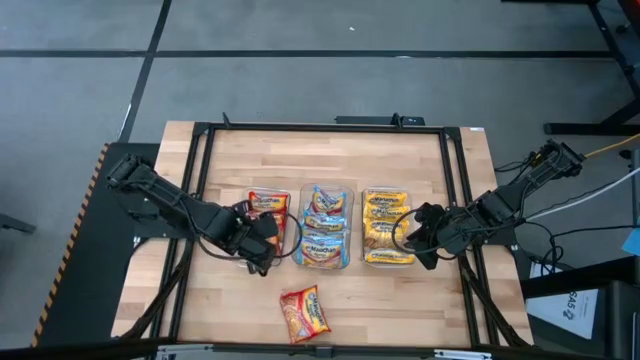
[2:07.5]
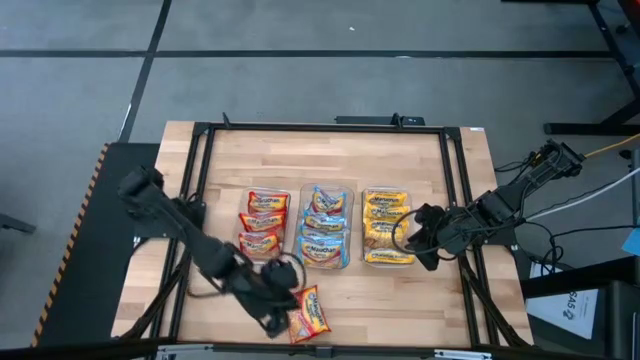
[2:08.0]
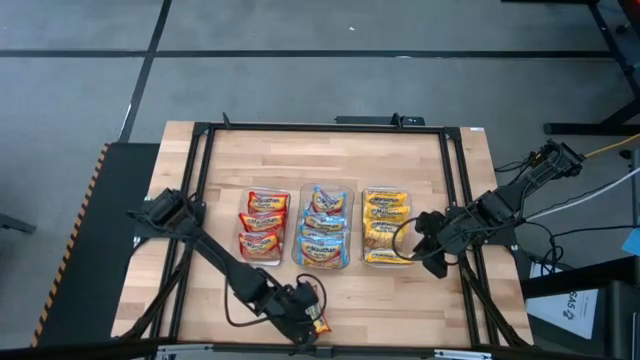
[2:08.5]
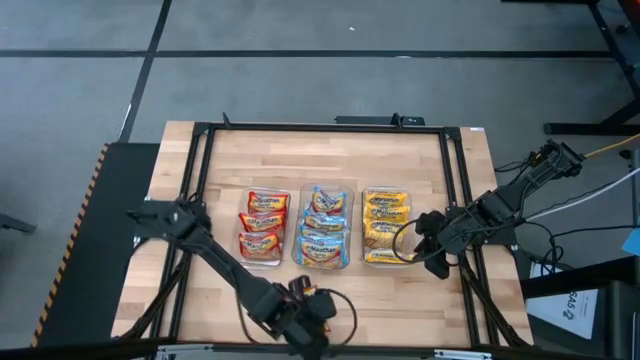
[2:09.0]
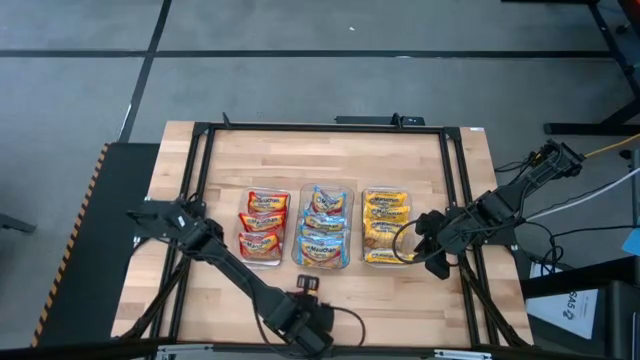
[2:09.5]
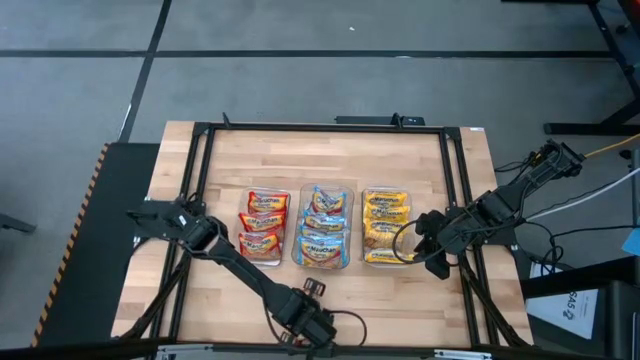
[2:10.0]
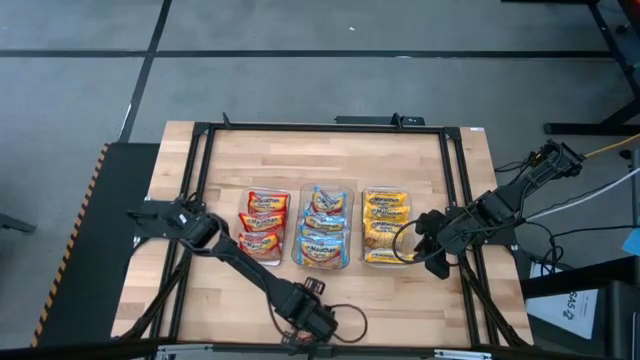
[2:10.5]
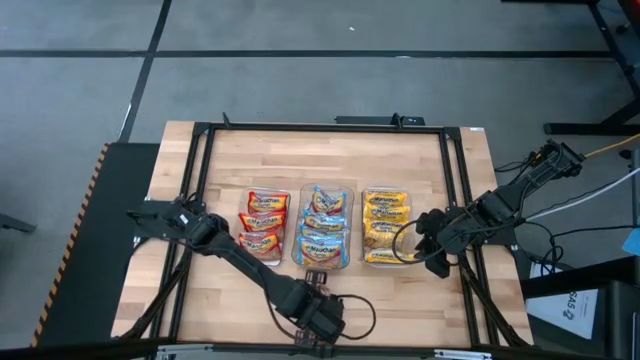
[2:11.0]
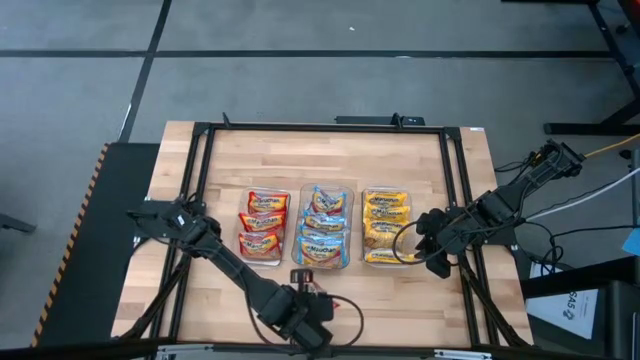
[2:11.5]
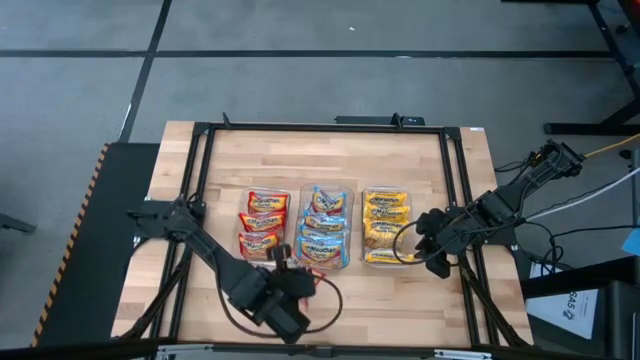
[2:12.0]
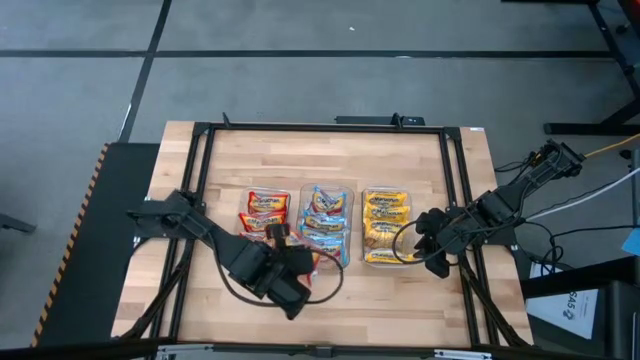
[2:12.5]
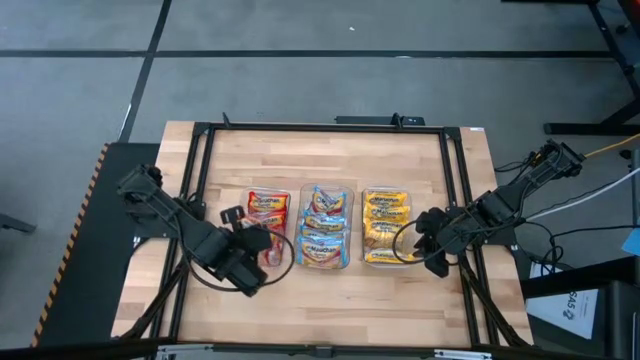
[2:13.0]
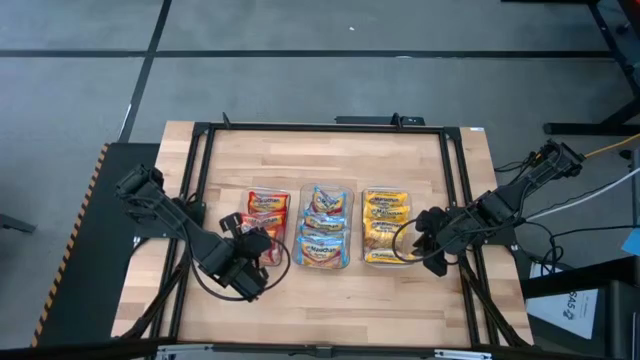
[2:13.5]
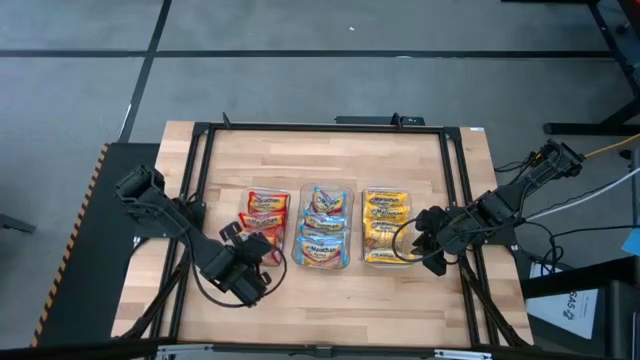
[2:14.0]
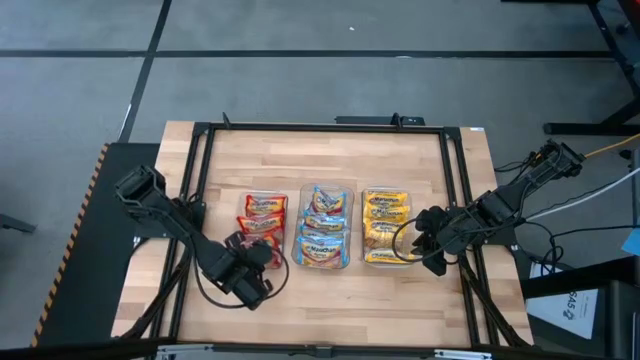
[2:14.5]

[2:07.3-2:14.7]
Task: Sort Maruchan noodles
Put the red noodle pack into the left transparent bin

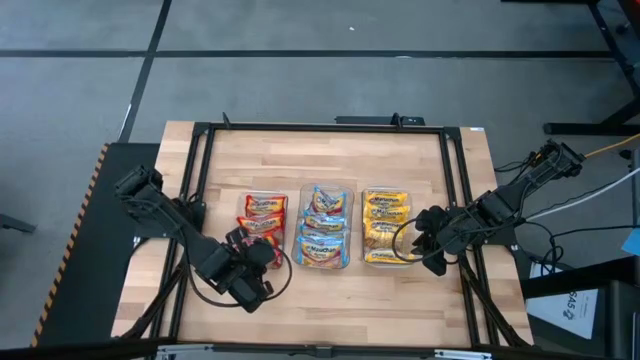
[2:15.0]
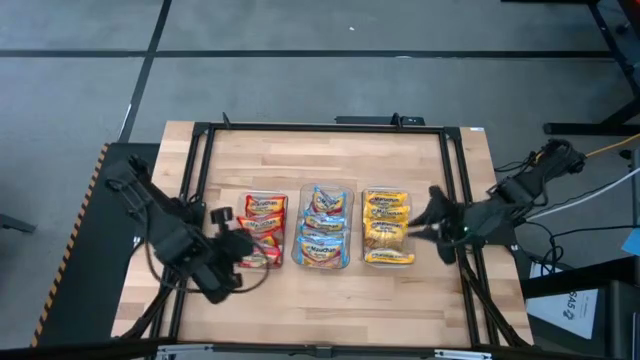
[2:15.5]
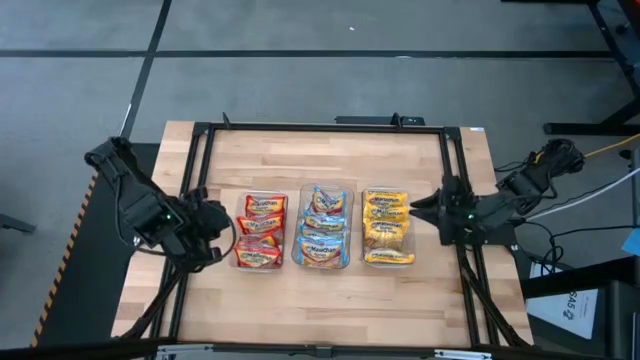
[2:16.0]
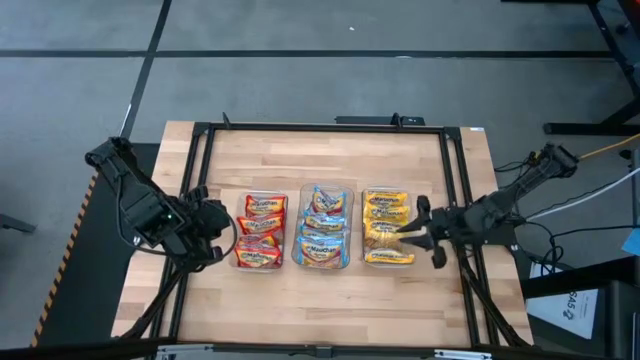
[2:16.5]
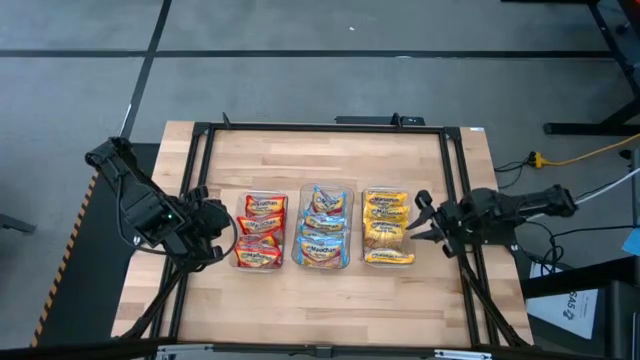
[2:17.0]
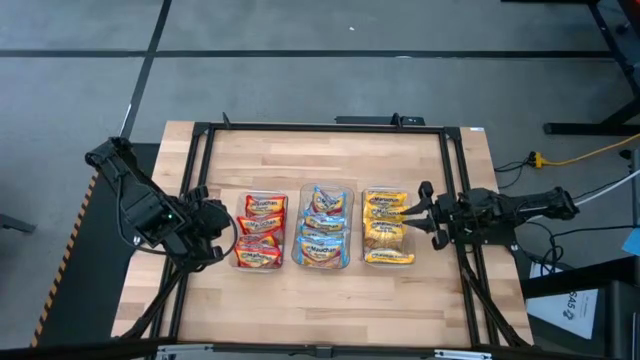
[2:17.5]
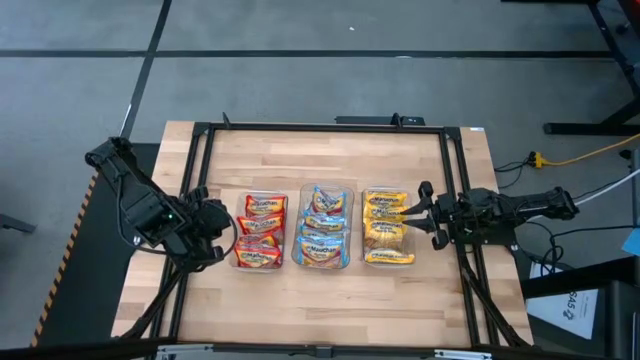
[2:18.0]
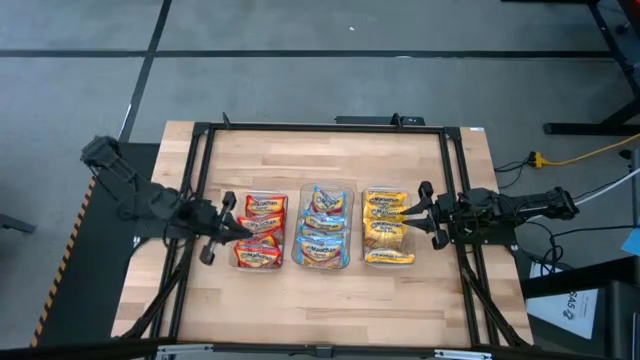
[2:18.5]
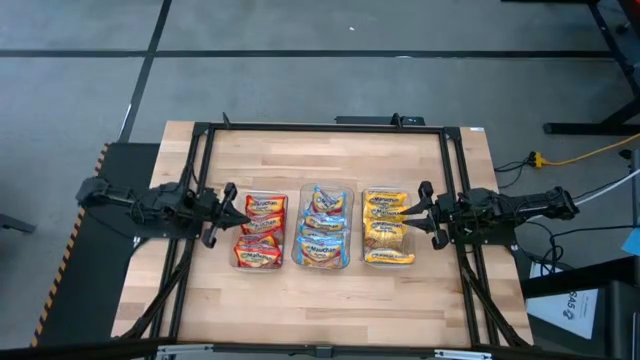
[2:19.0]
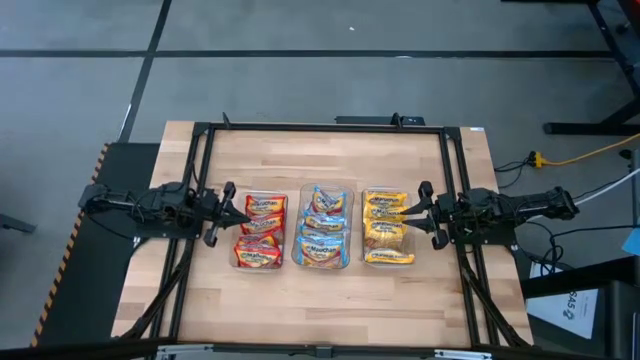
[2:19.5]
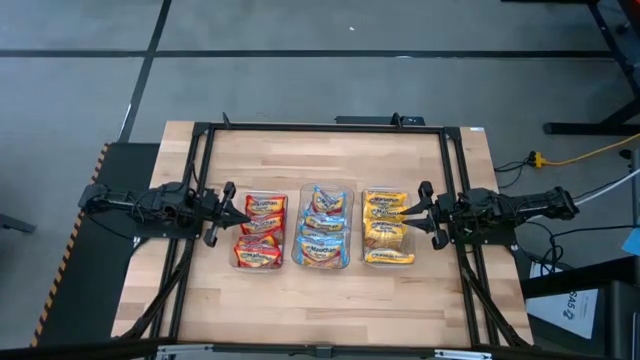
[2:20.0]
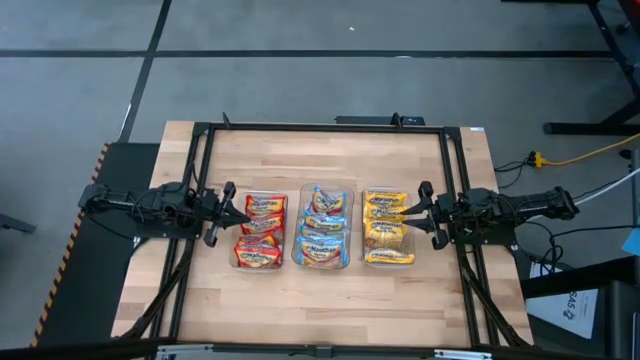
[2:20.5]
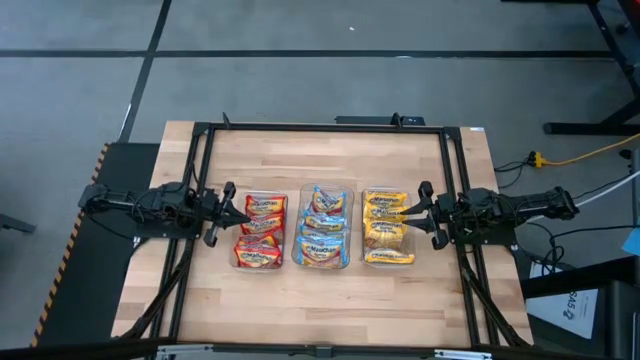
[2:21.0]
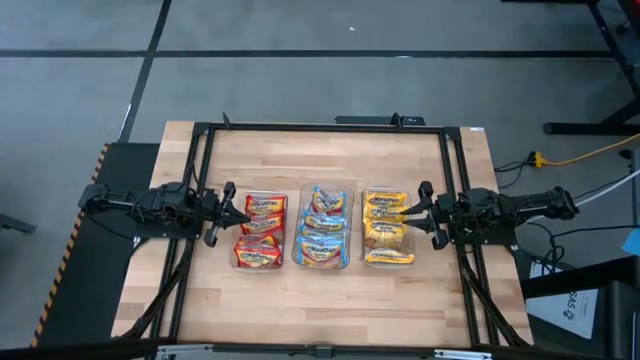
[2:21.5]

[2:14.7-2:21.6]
Return to Home Position
